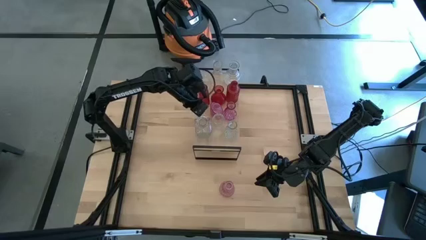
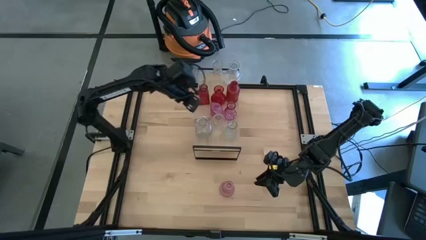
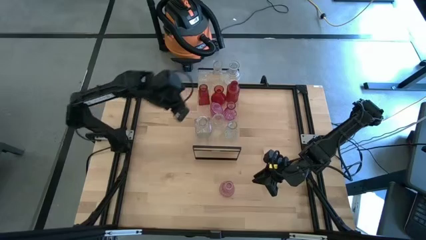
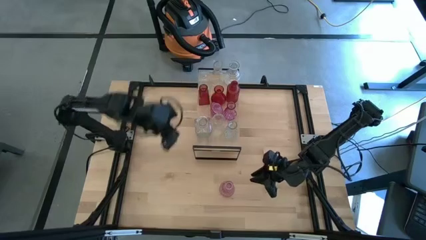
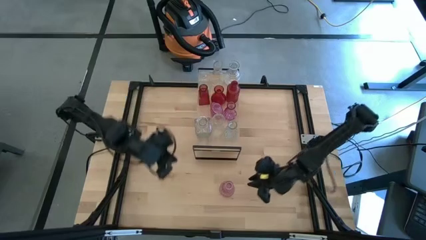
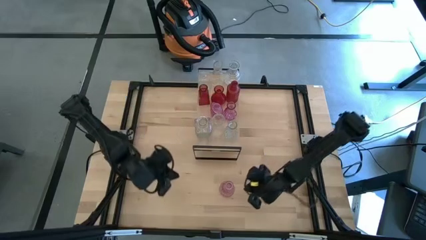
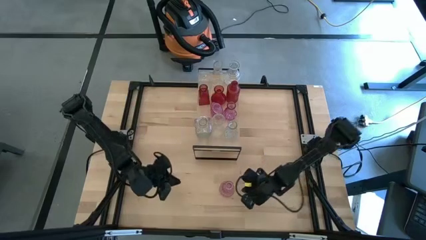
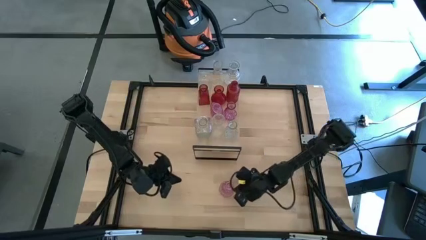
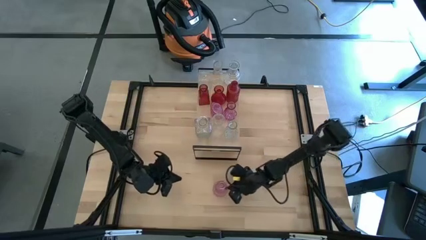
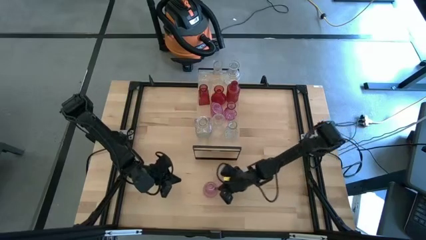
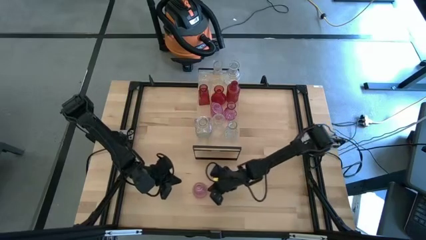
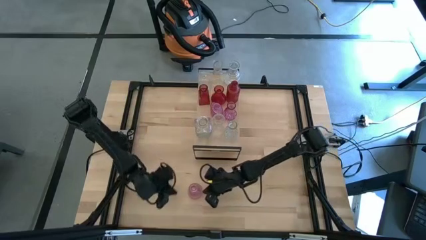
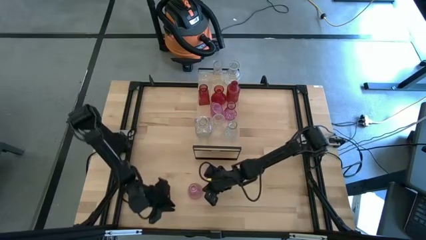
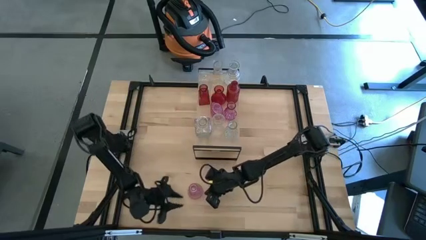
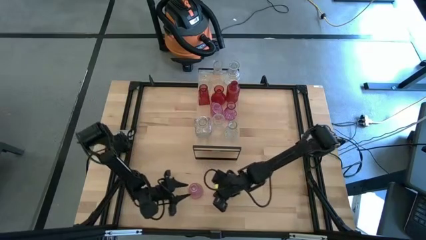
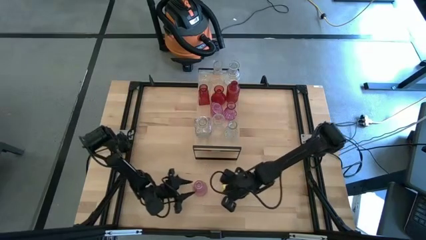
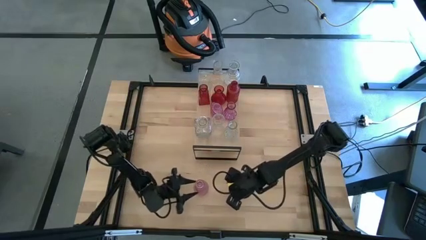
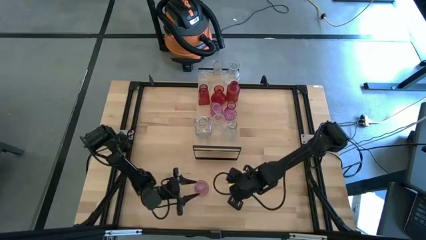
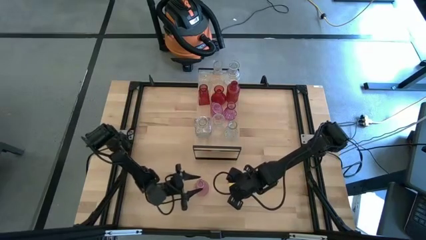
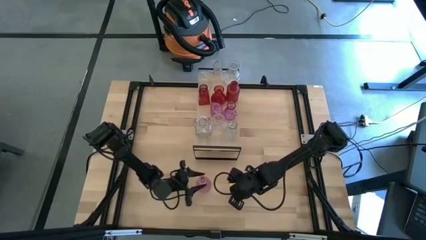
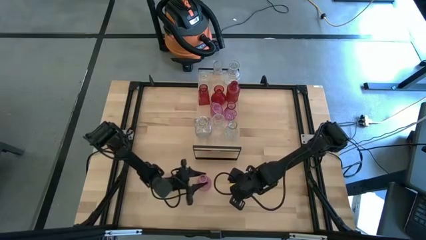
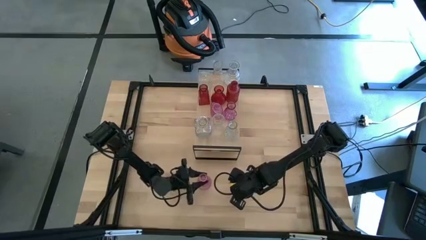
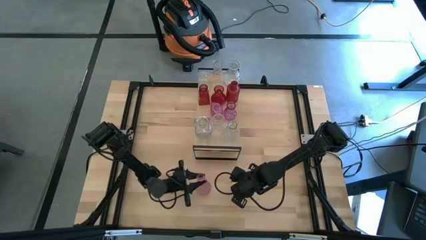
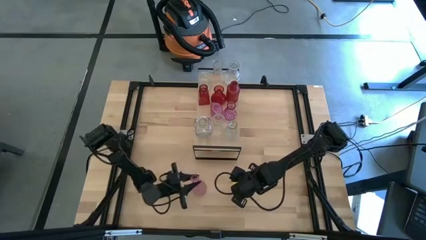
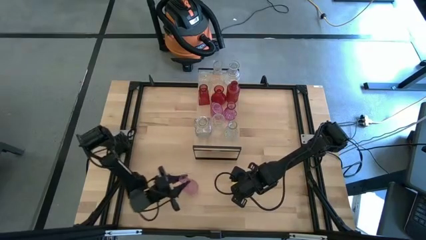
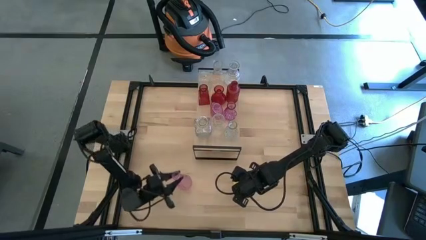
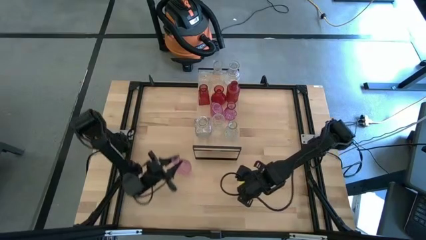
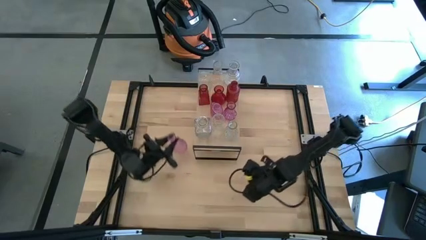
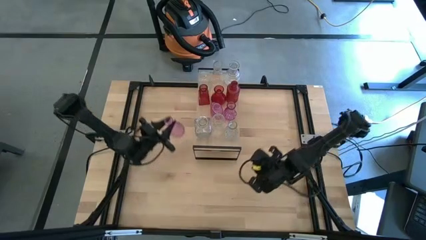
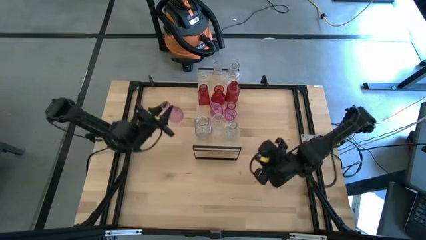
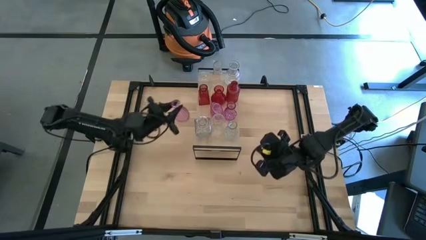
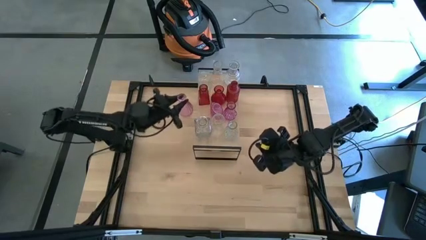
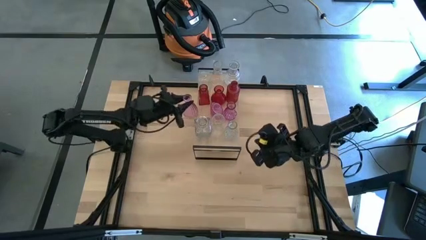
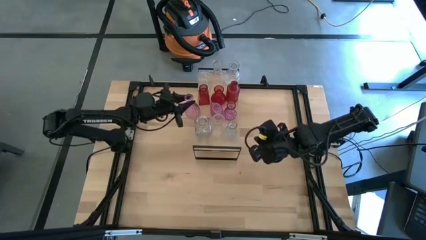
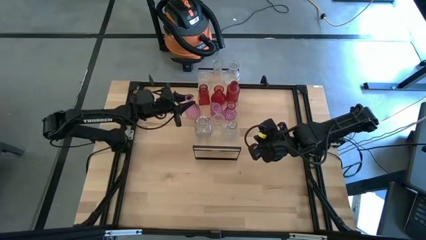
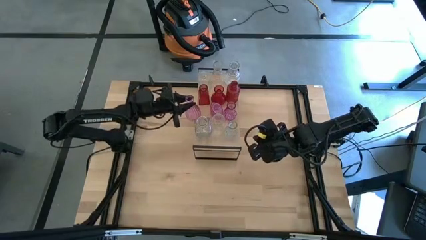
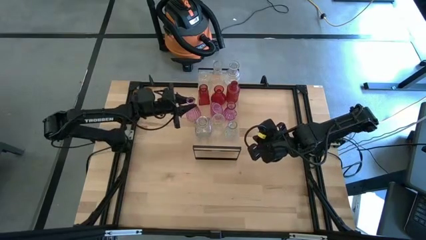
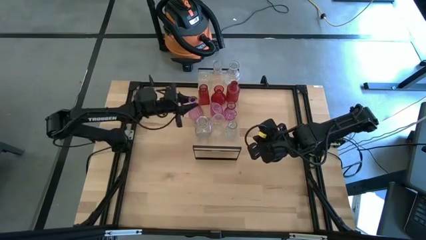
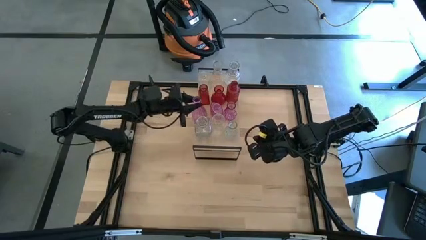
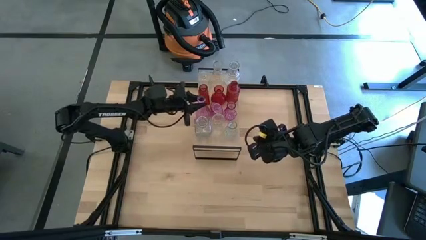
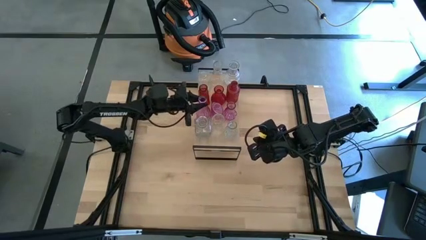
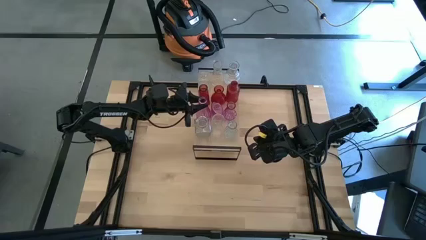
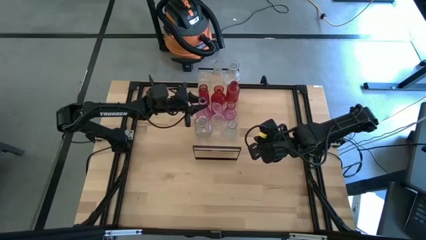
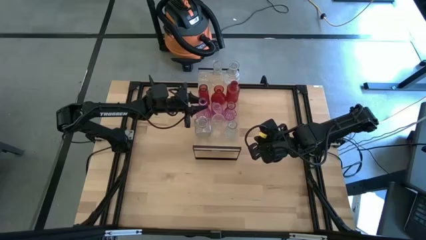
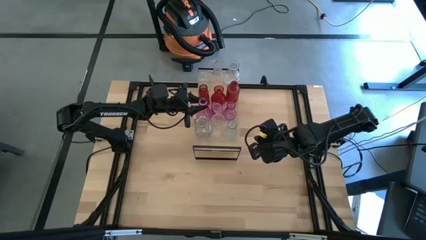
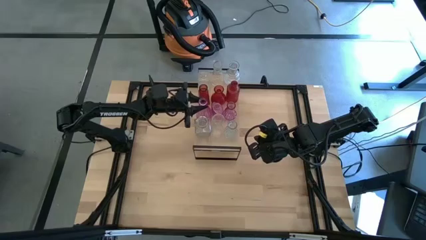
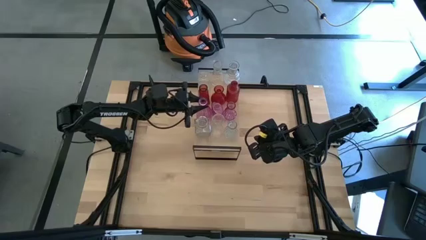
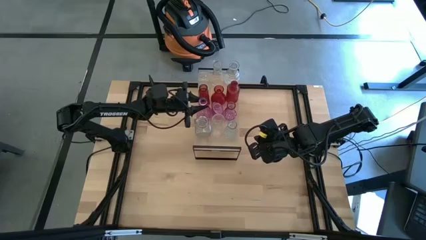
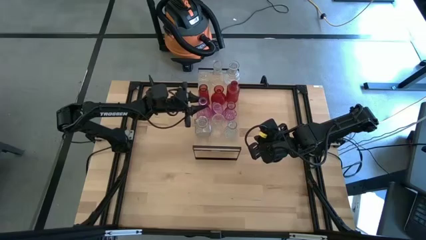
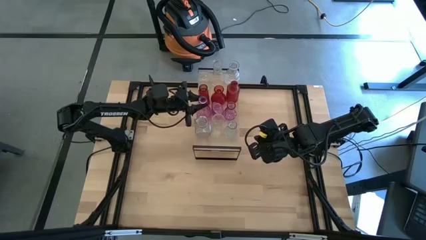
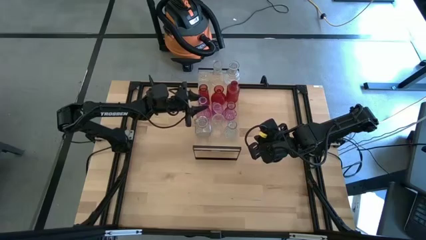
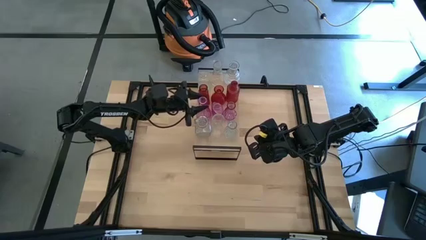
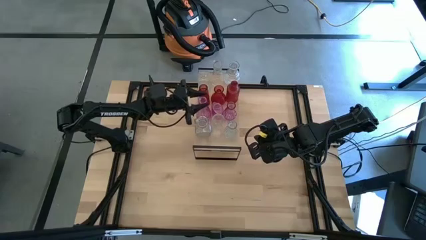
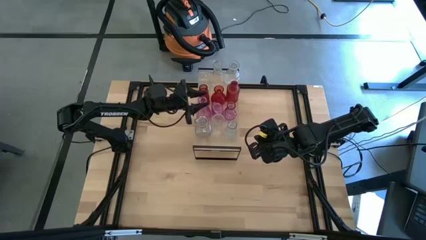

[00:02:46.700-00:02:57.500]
Task: sort vases onto shelf
Put the purple vase on the shelf aligned with the other purple vases

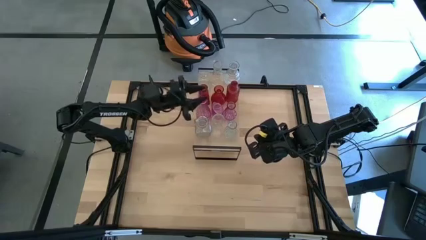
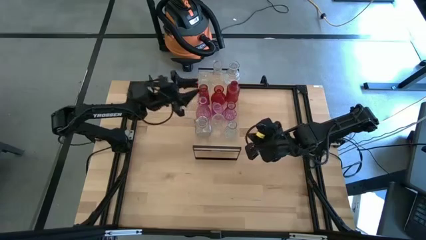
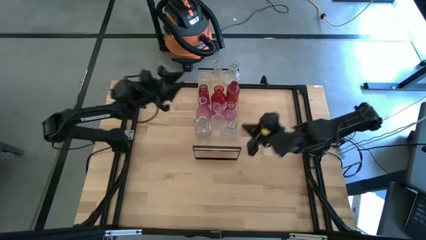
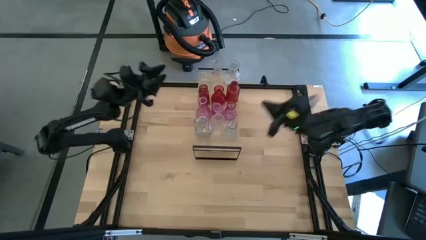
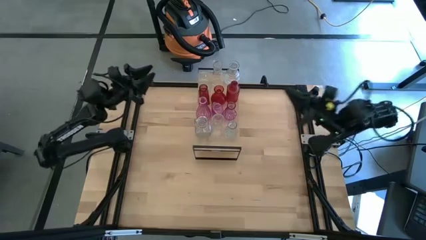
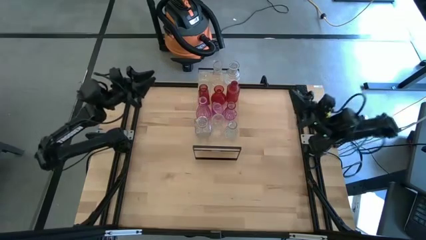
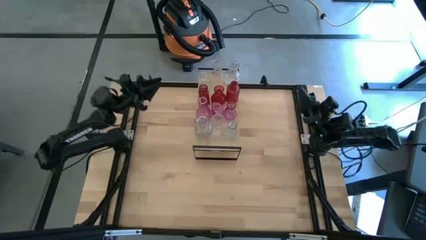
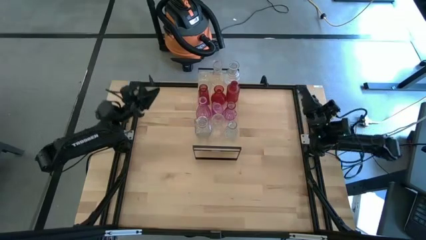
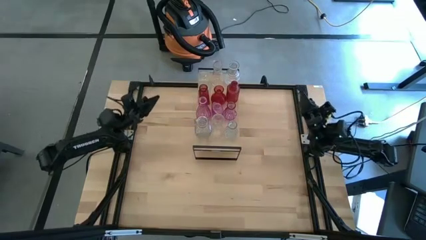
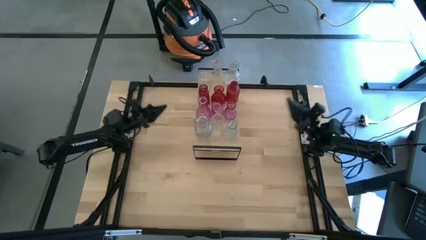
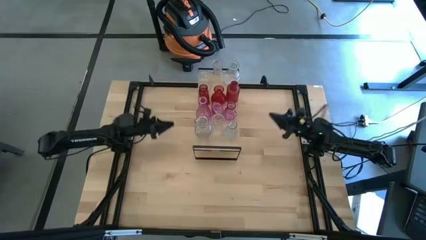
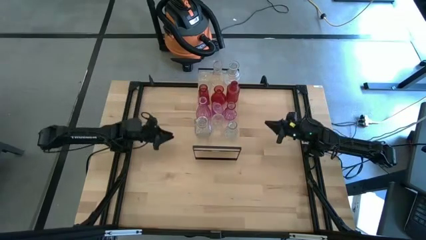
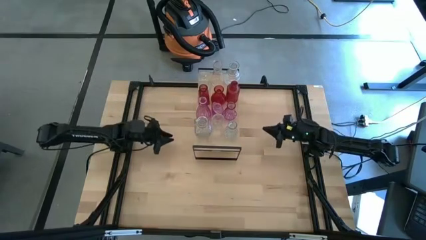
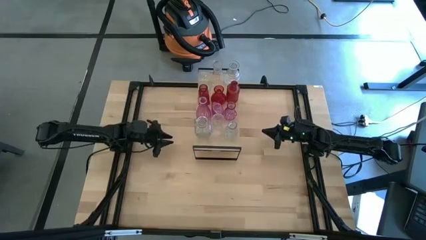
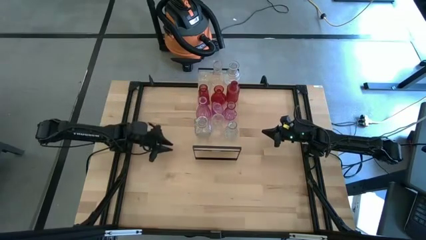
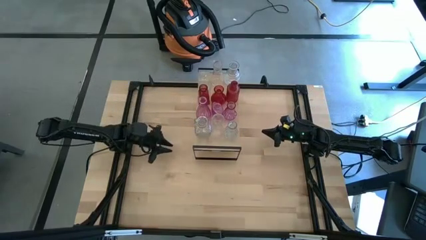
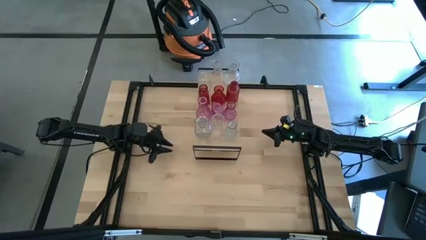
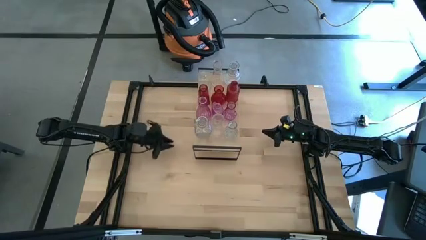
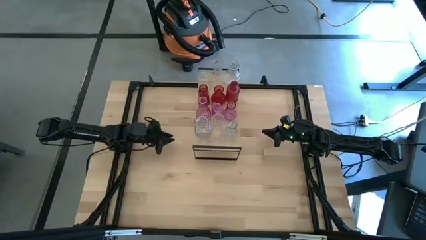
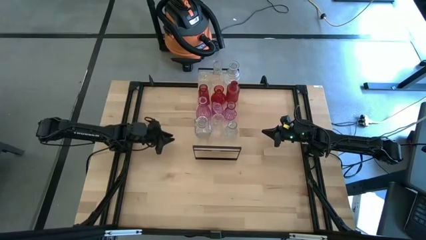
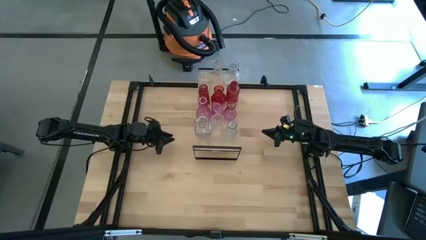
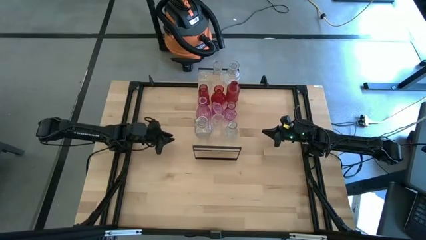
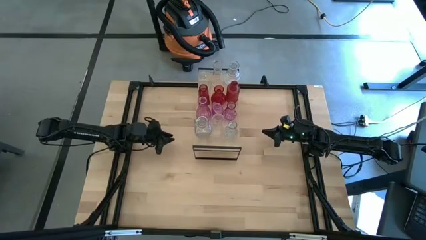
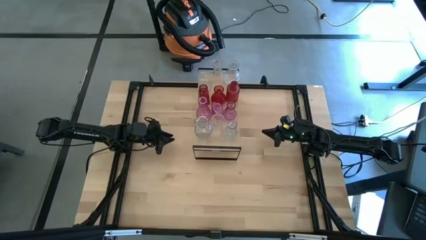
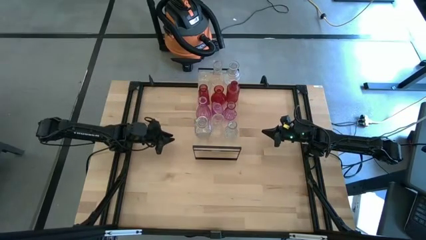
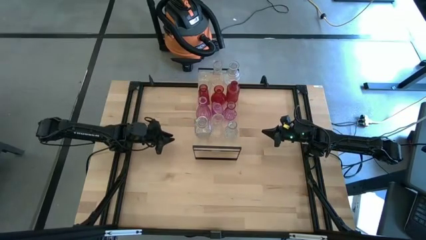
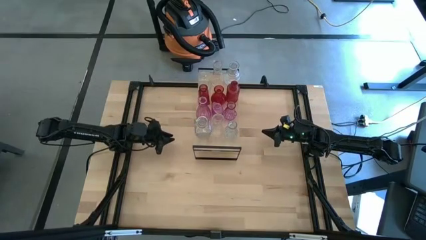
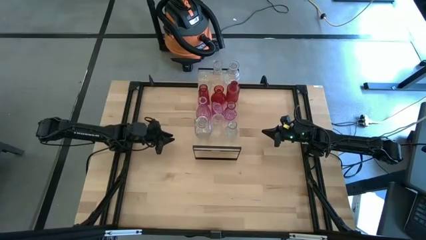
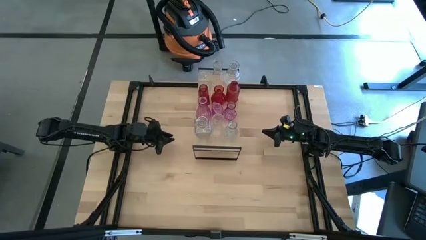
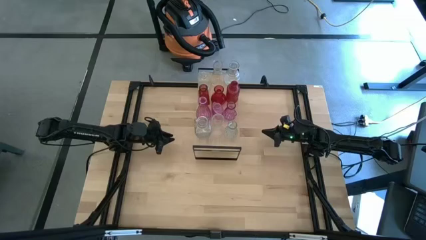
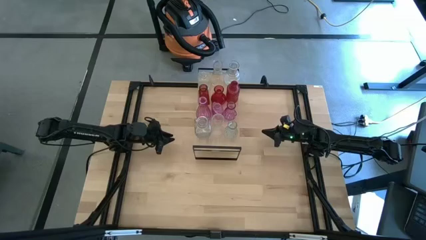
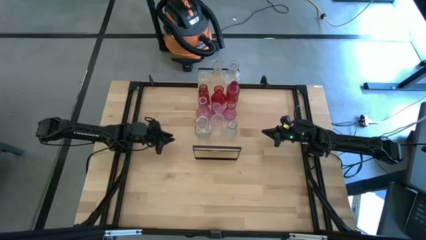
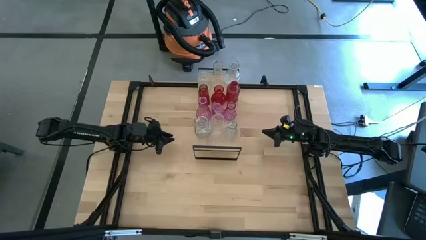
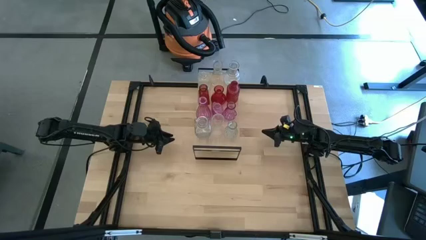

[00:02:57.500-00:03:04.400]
Return to Home Position
